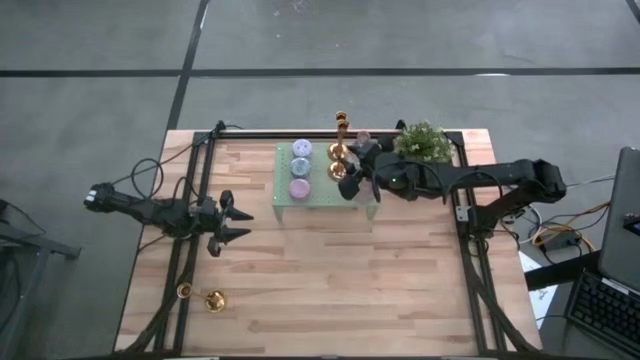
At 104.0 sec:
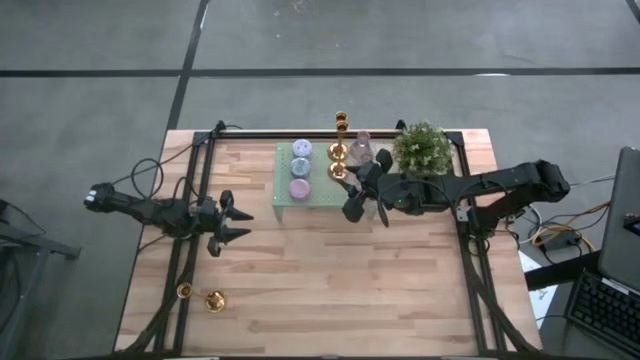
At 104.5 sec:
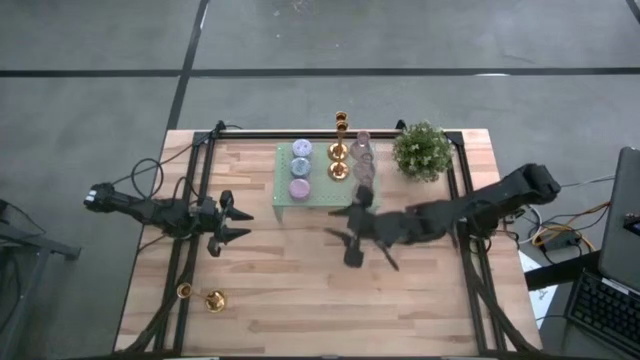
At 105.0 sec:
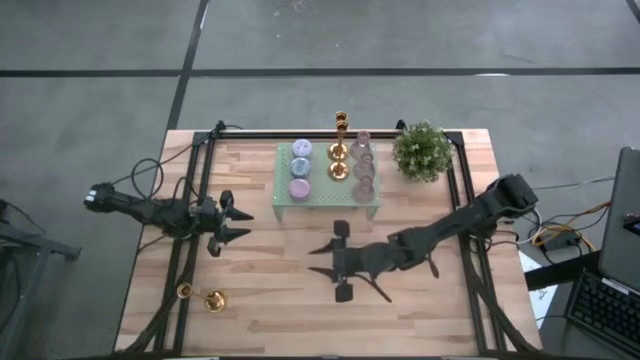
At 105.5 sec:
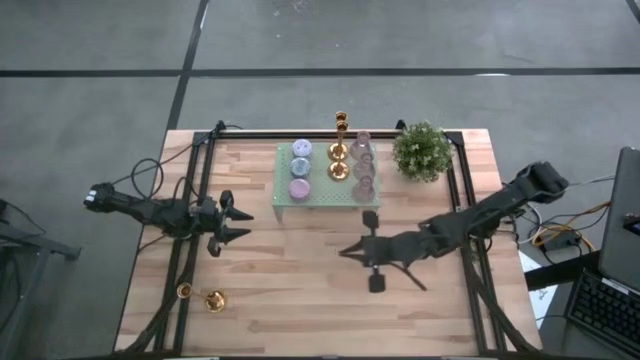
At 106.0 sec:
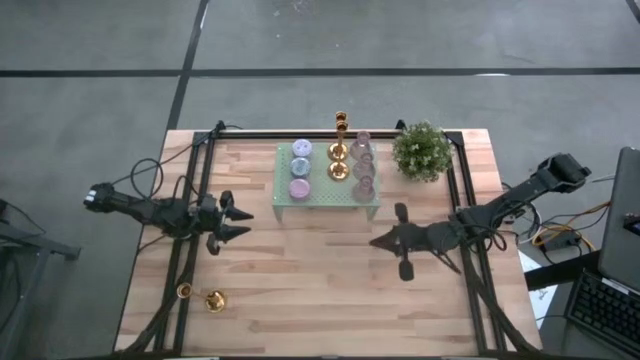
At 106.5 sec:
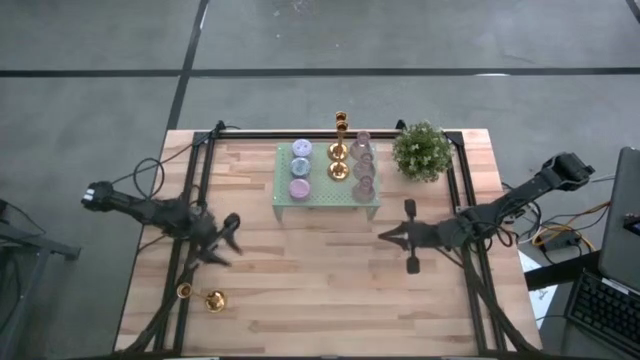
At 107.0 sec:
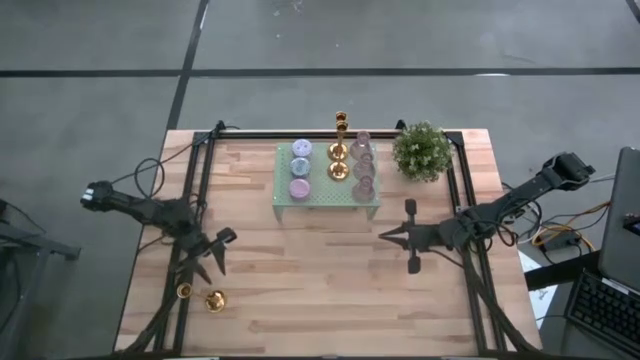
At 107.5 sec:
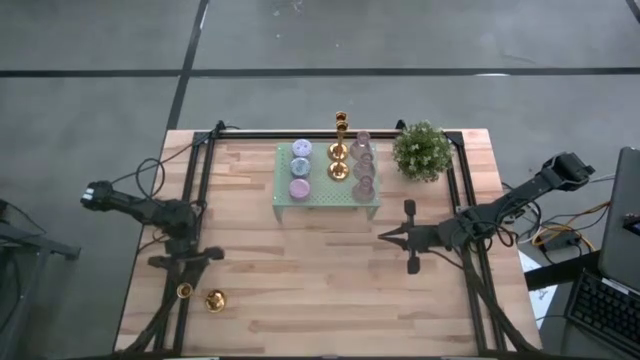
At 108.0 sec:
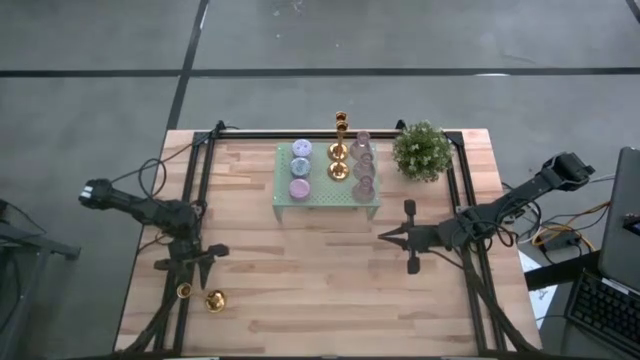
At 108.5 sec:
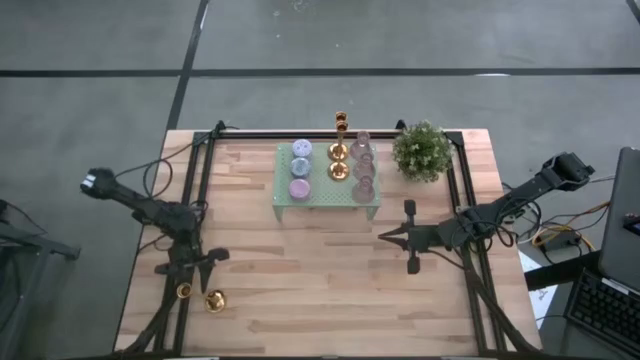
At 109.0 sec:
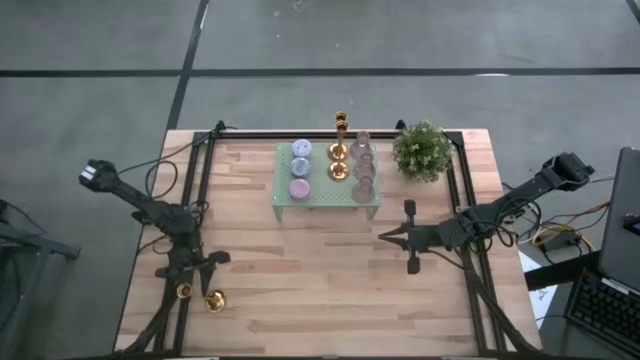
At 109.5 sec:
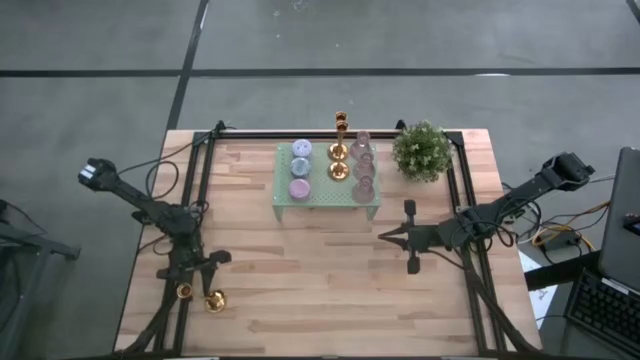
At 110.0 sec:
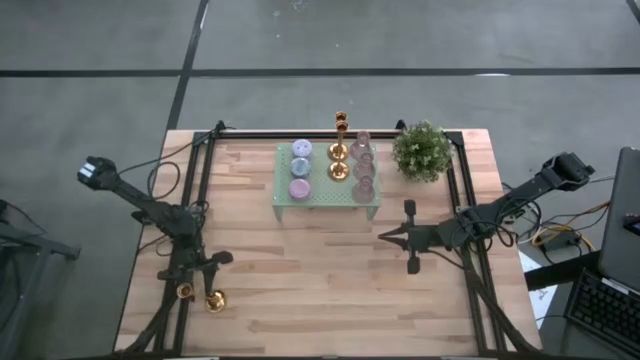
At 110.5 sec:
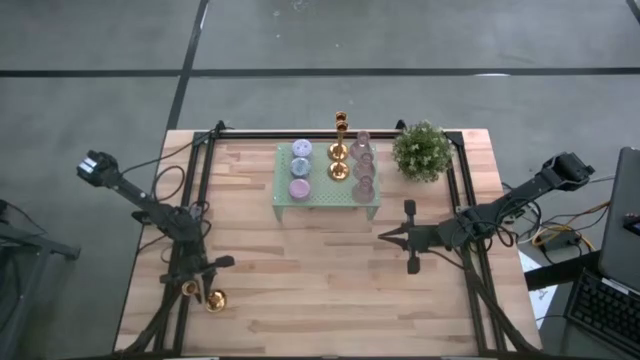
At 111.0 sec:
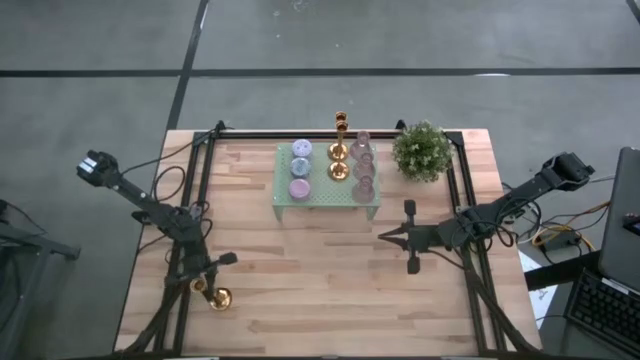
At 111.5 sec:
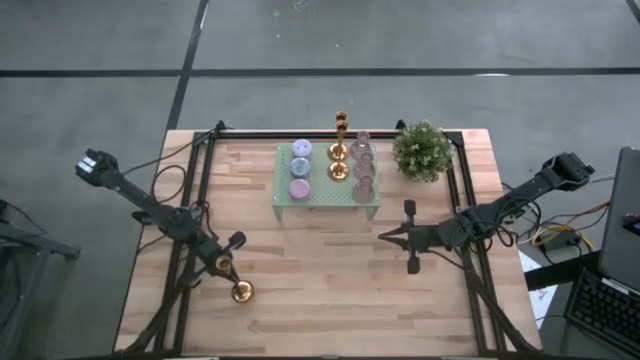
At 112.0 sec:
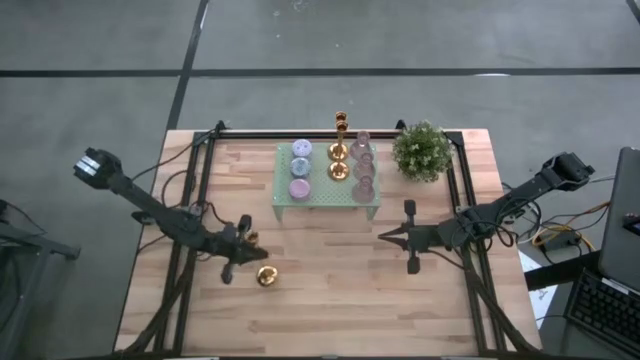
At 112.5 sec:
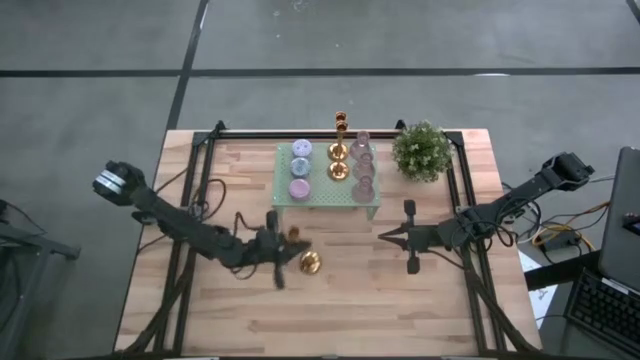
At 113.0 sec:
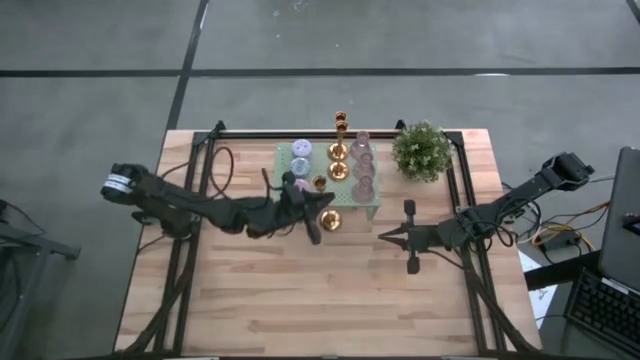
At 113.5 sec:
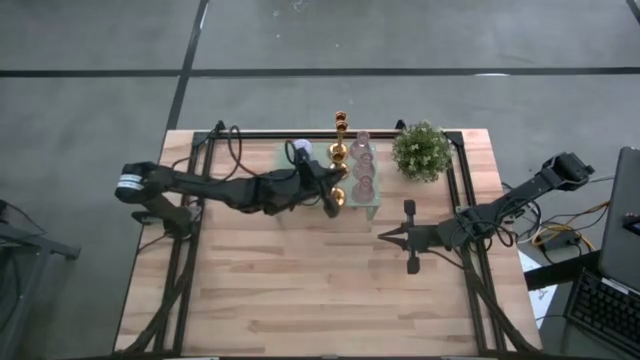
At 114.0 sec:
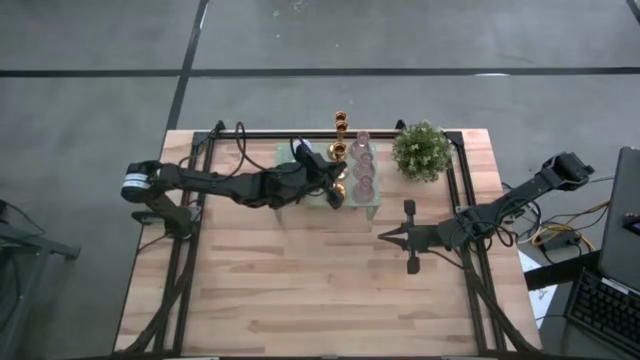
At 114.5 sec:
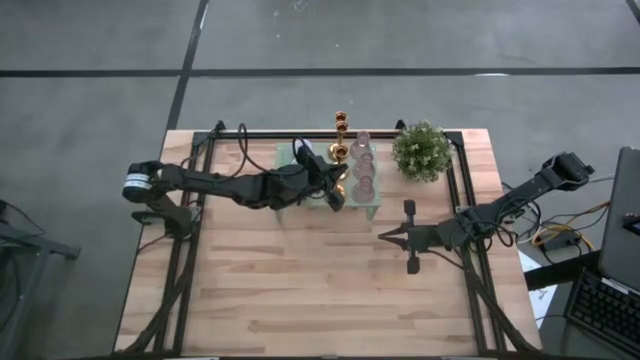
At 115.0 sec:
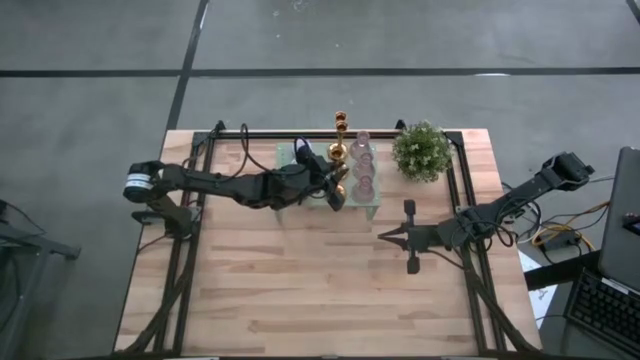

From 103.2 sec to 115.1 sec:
Task: Pick & Place candle stick holders
Put the gold candle holder on the shelf aligned with the other gold candle holders

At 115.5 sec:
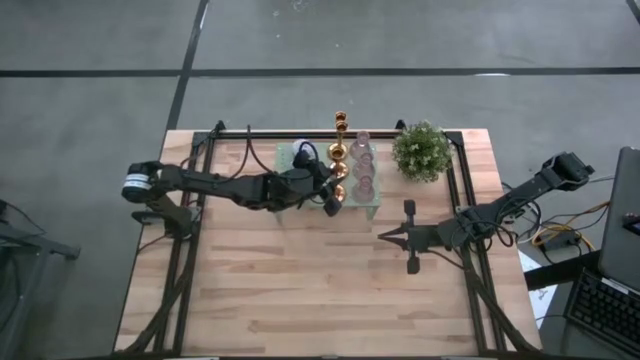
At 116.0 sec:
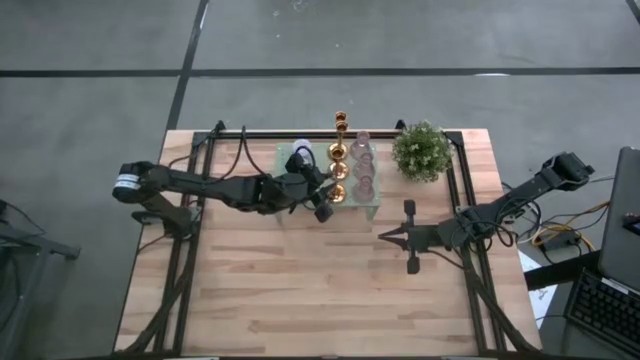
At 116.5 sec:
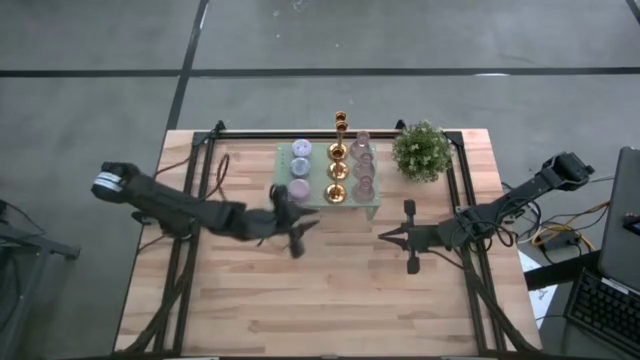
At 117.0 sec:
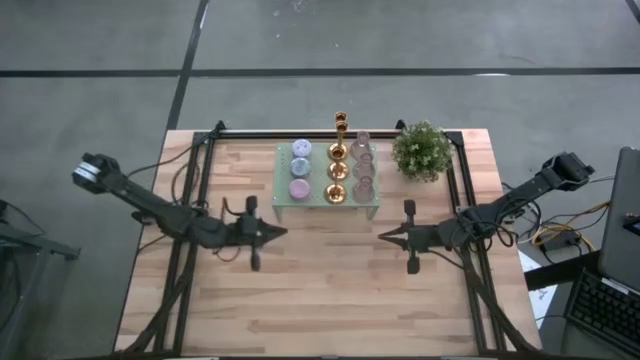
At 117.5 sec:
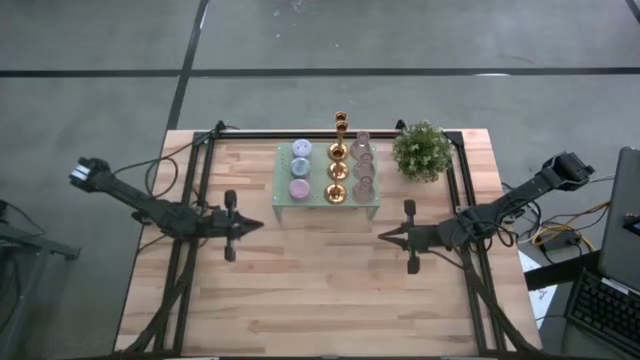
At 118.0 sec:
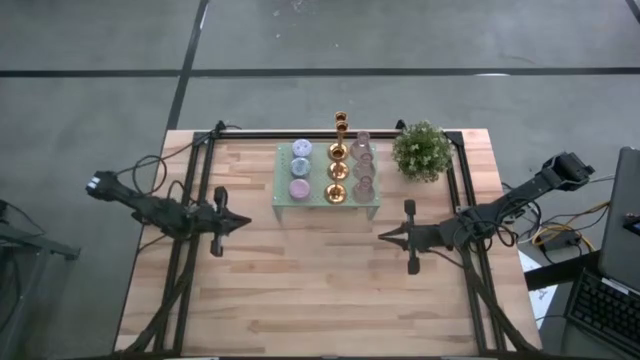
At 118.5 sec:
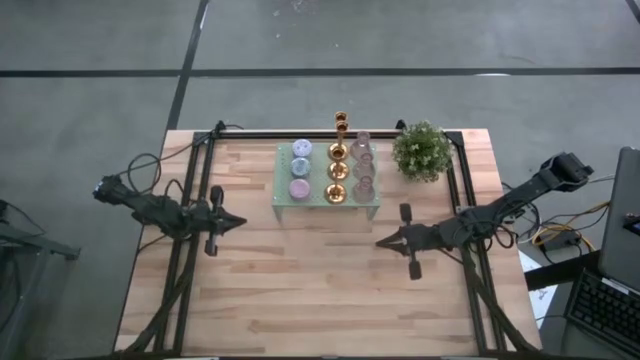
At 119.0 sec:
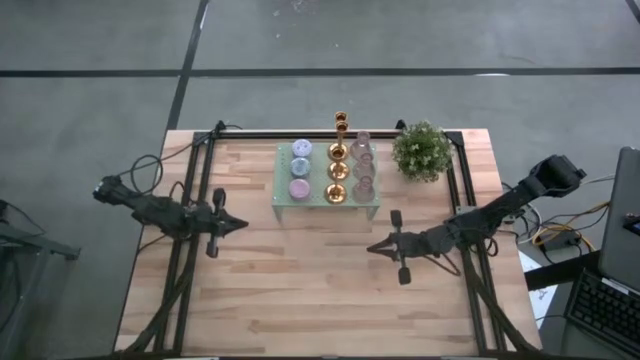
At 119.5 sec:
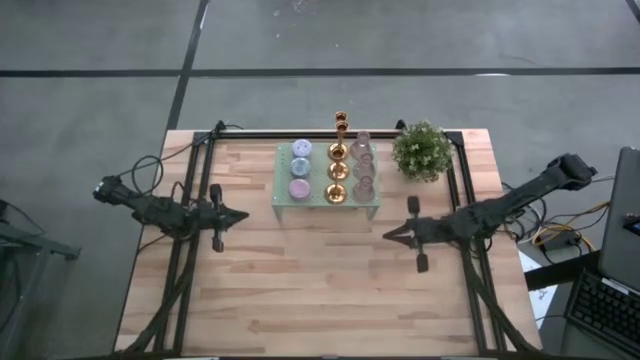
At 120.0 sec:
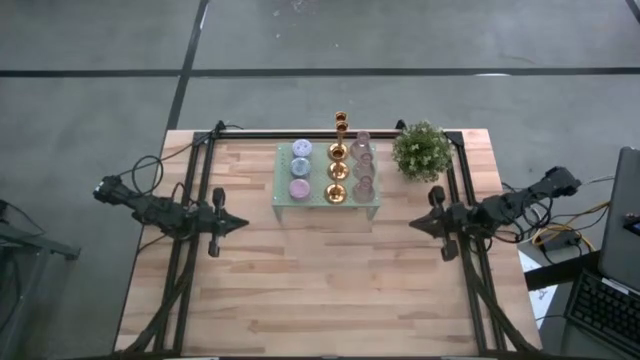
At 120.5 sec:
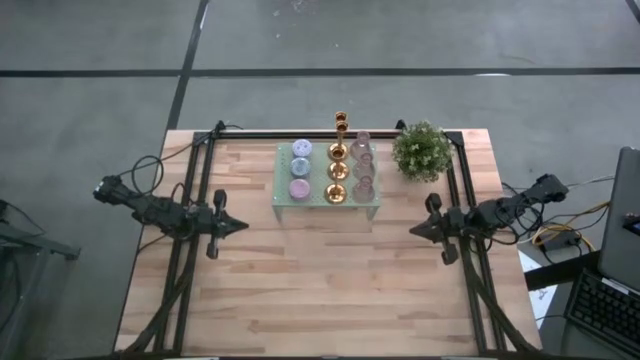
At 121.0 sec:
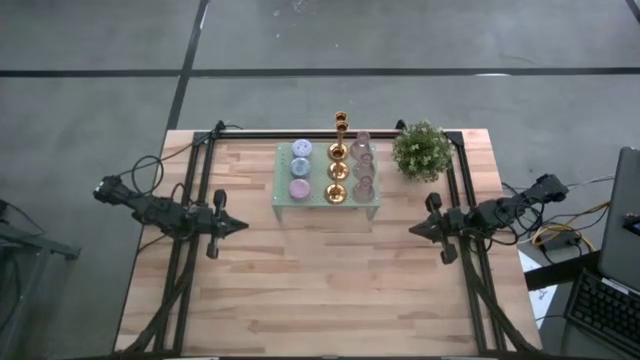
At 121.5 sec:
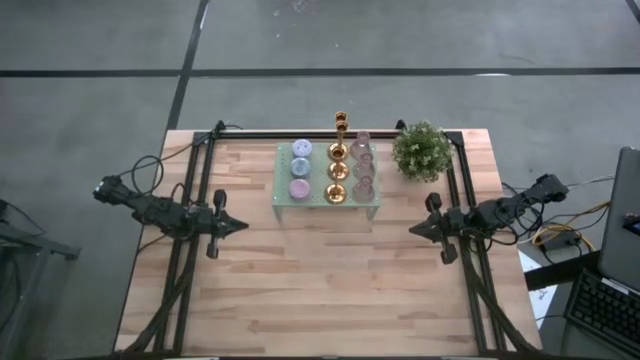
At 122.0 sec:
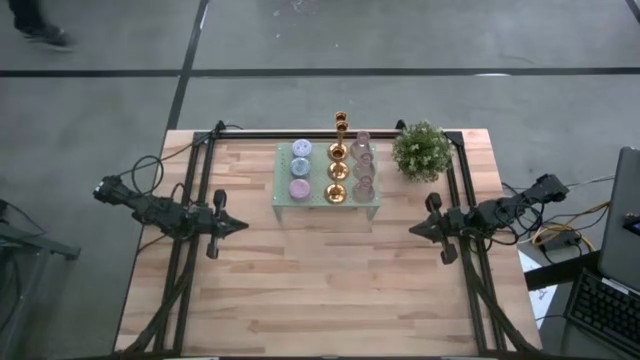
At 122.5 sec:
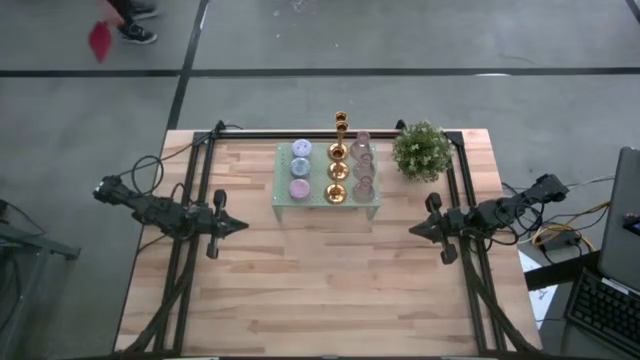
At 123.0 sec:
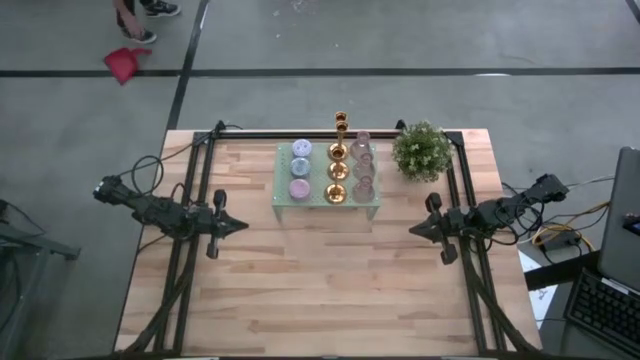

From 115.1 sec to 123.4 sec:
Return to Home Position
